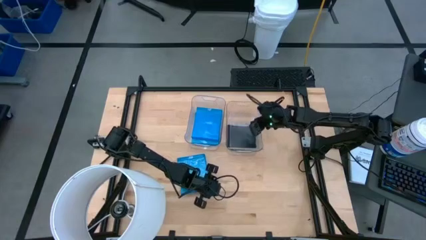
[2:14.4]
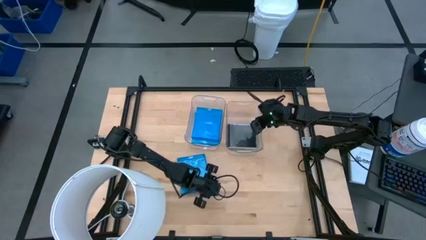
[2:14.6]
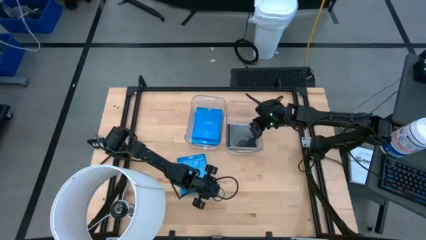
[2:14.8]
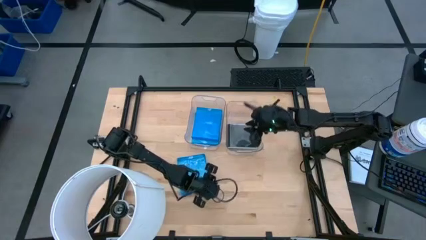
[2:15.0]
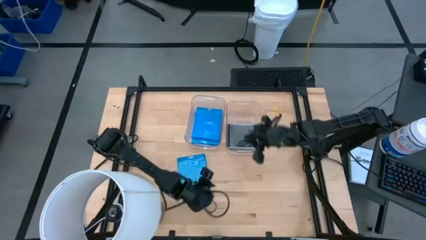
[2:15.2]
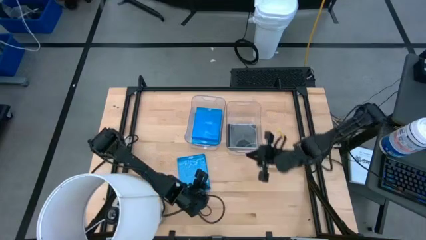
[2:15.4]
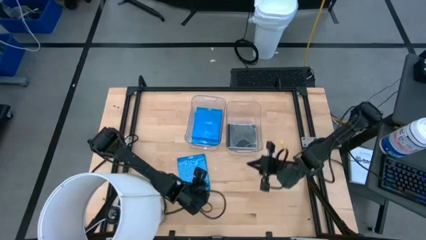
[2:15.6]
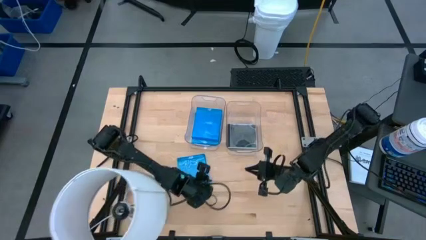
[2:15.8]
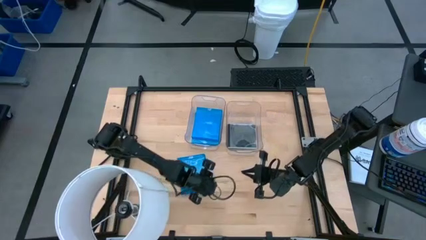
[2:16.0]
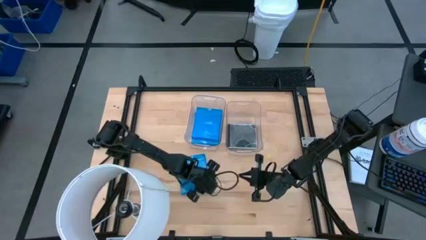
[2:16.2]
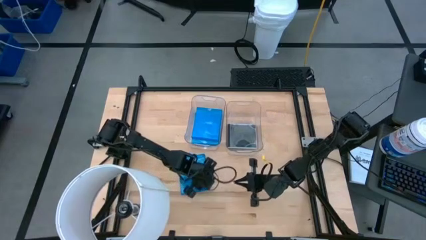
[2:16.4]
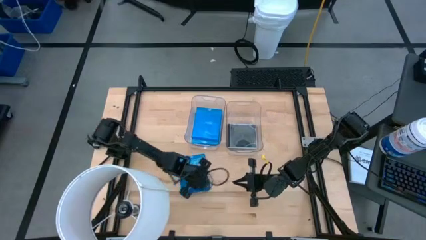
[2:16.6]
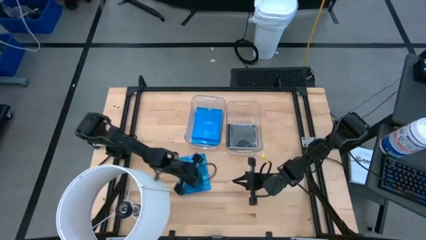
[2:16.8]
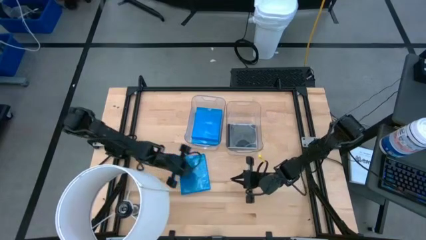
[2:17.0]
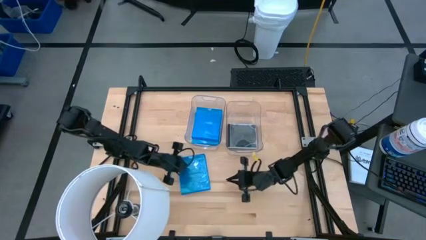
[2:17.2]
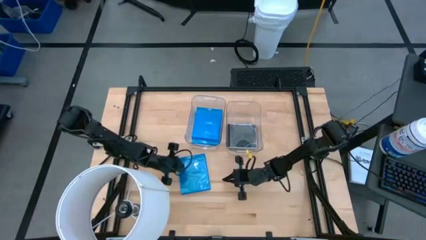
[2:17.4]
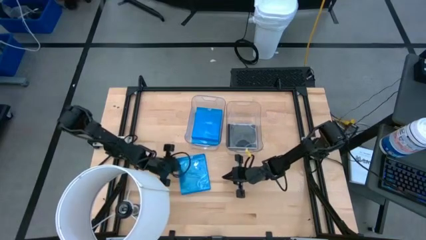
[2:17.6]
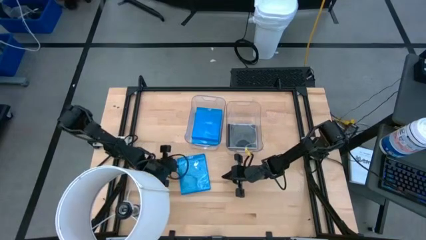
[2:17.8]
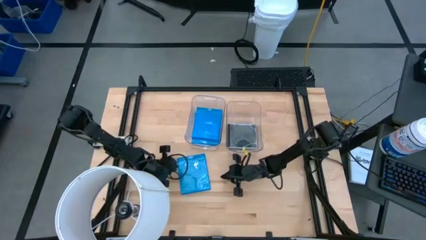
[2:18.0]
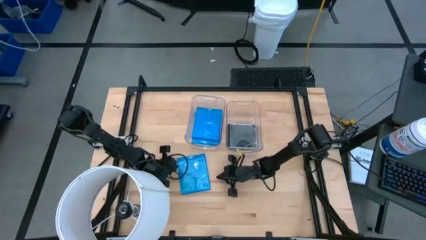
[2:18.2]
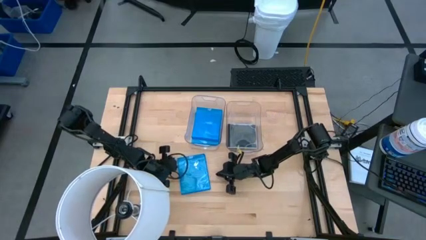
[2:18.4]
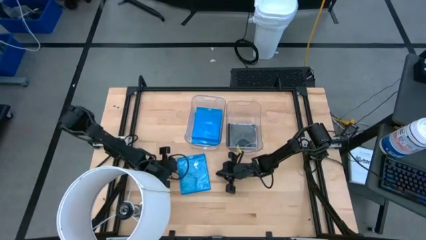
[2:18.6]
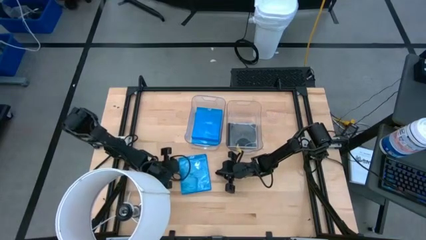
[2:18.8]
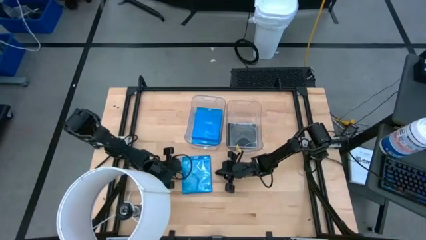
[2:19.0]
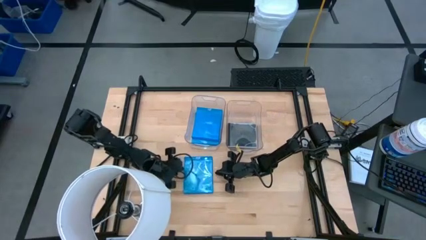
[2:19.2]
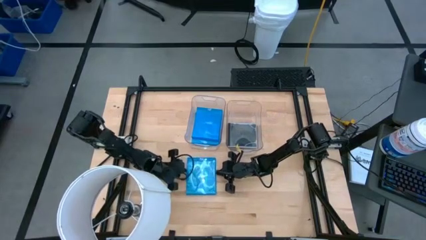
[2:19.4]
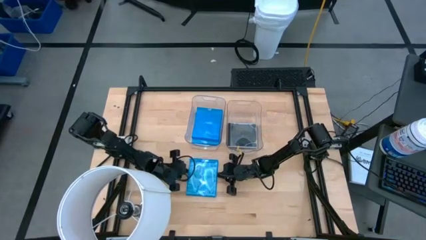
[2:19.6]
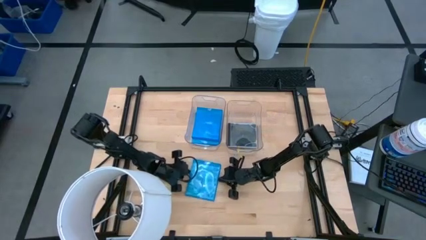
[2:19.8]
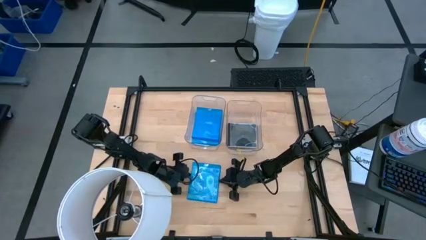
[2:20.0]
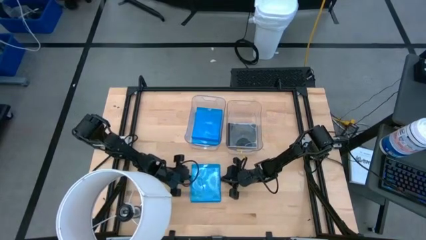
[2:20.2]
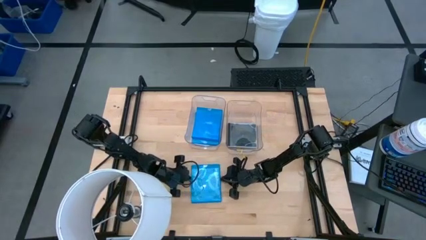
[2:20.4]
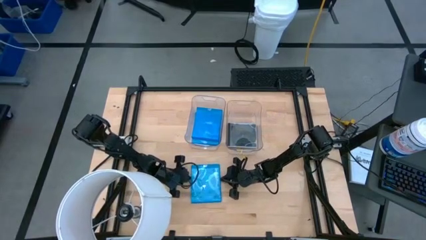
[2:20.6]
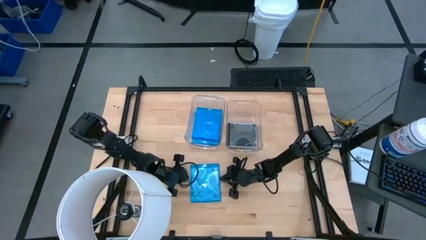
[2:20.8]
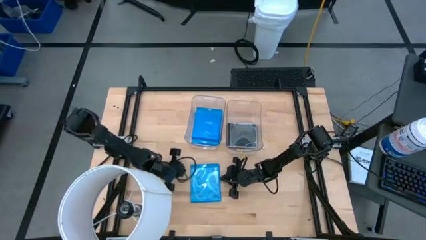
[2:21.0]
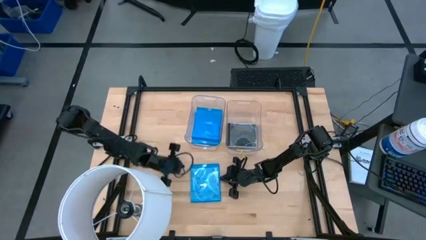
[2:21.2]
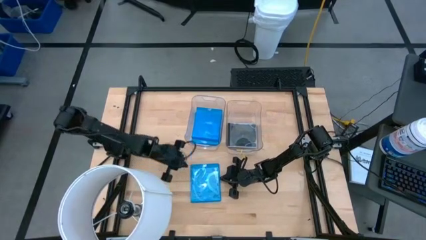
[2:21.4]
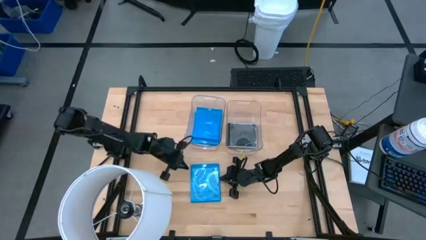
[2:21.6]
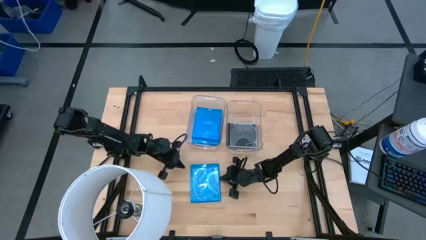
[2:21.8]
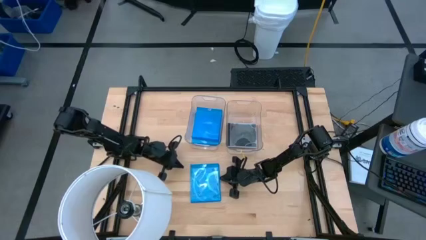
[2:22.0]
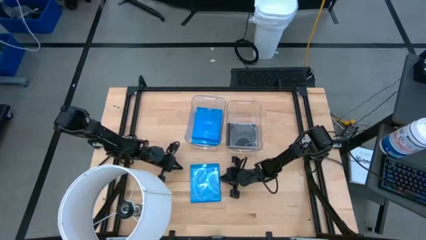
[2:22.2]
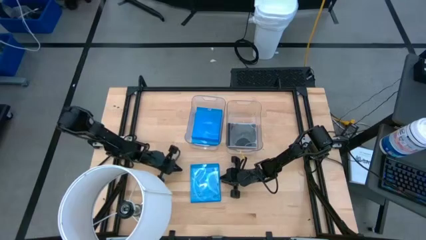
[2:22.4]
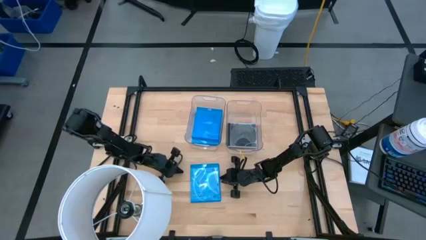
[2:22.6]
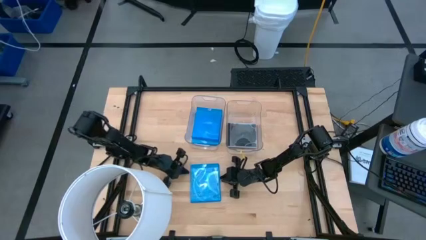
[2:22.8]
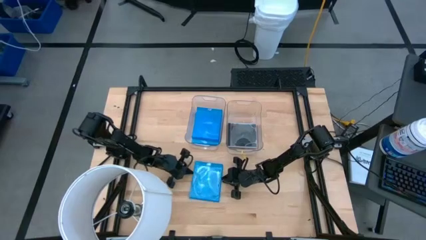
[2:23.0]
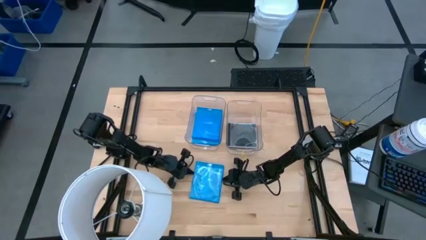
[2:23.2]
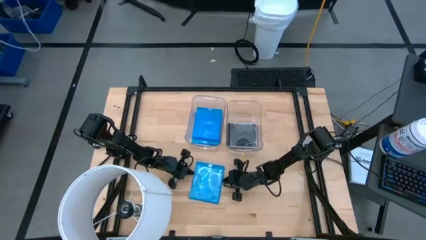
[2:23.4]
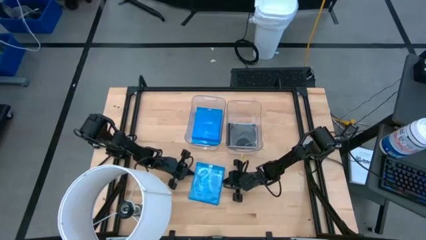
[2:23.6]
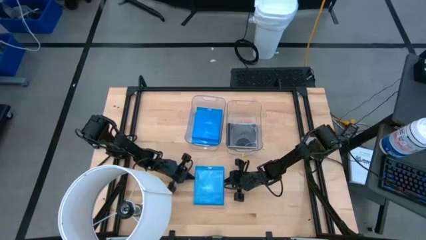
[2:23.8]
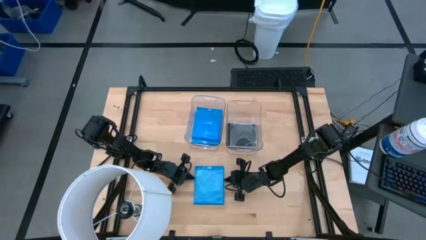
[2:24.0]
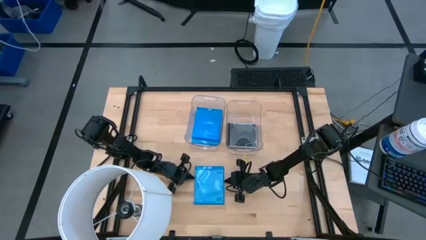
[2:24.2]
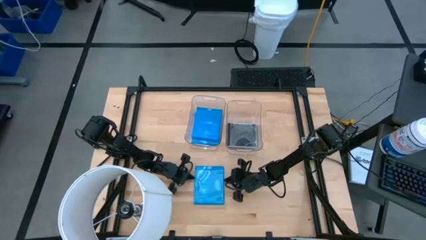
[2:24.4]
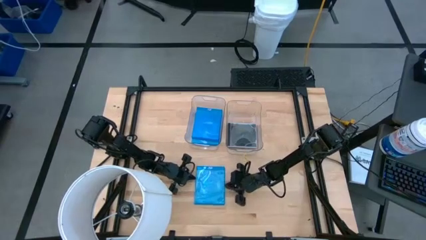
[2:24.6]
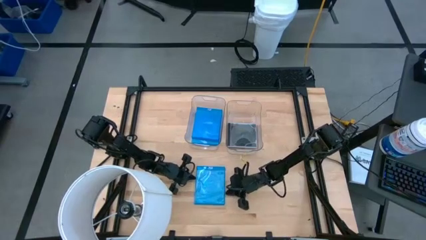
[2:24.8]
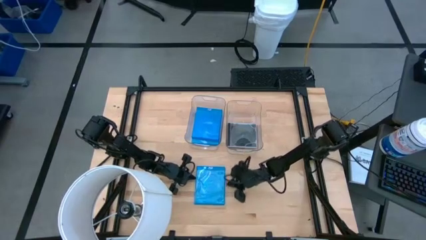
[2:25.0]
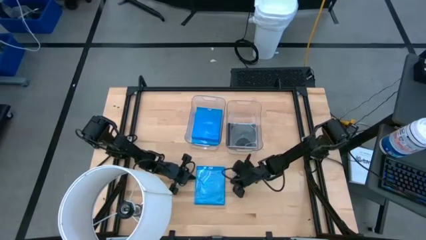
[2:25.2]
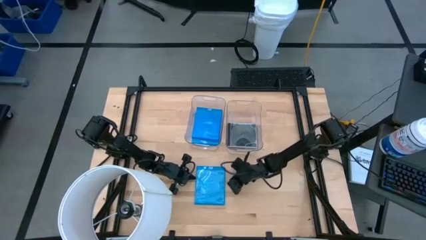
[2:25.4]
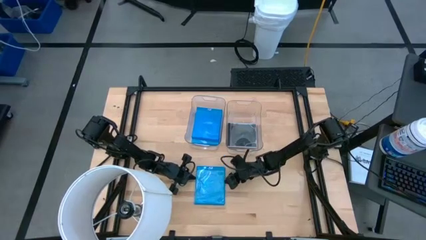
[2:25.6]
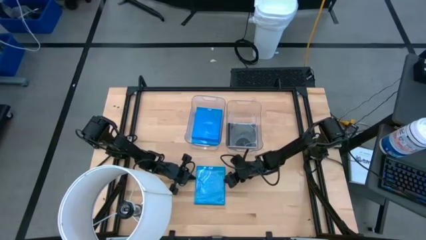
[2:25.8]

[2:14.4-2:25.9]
Task: Pick & place jewel cases by type
Put the blue CD case into the left transparent bin

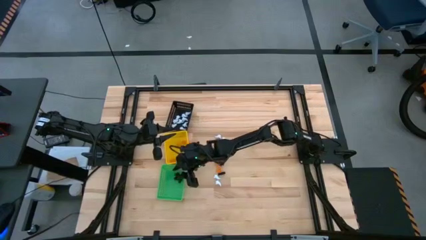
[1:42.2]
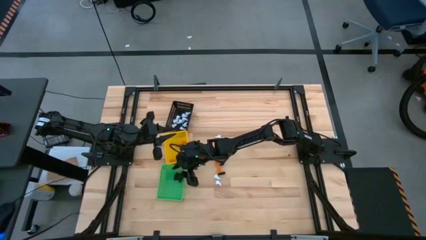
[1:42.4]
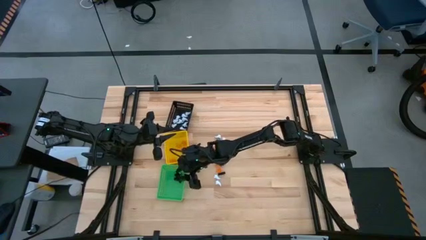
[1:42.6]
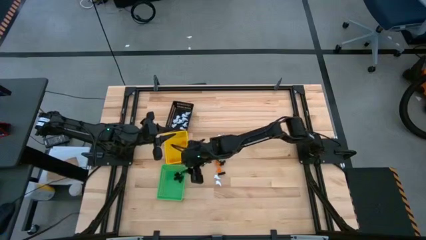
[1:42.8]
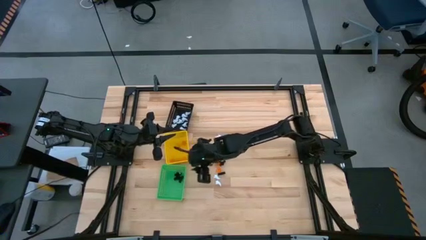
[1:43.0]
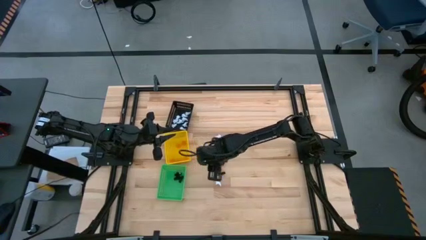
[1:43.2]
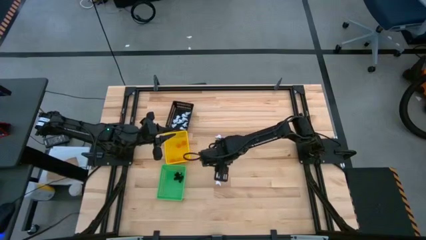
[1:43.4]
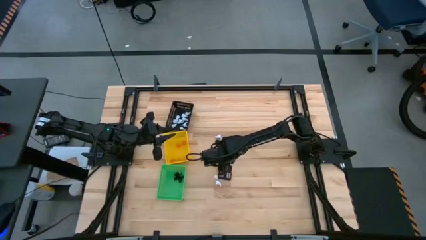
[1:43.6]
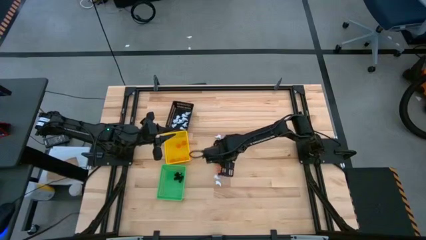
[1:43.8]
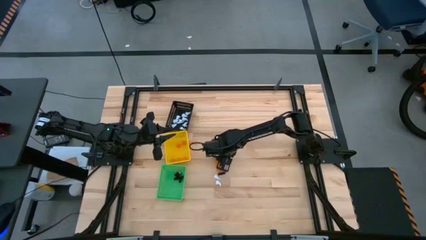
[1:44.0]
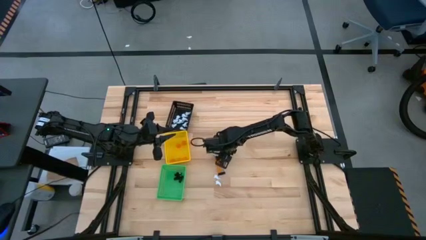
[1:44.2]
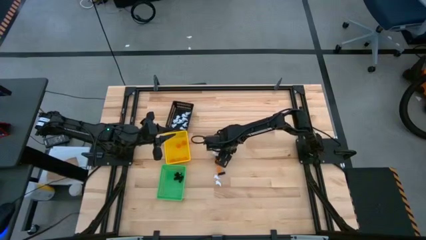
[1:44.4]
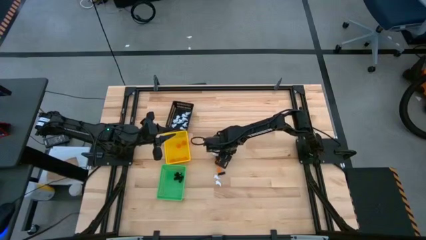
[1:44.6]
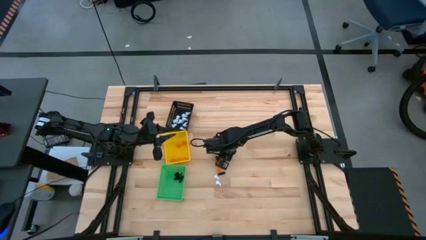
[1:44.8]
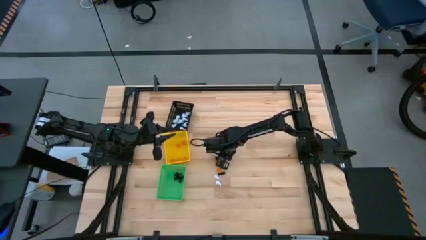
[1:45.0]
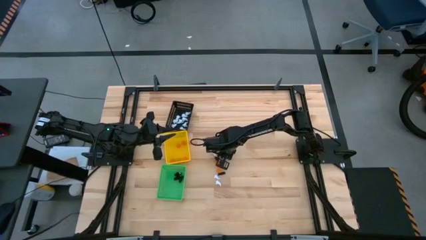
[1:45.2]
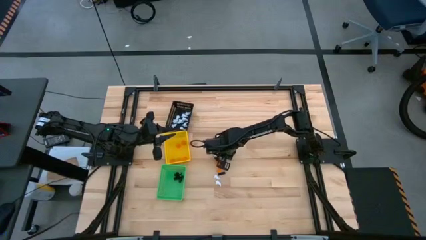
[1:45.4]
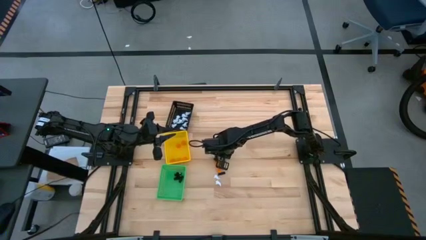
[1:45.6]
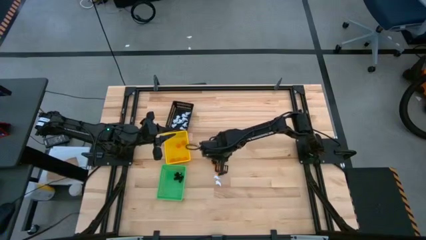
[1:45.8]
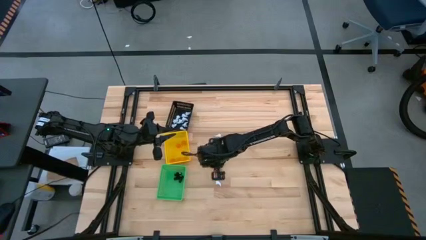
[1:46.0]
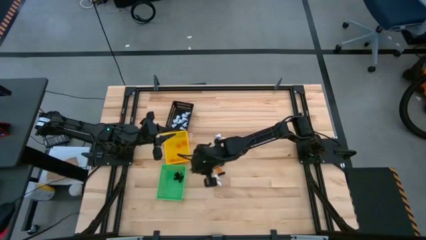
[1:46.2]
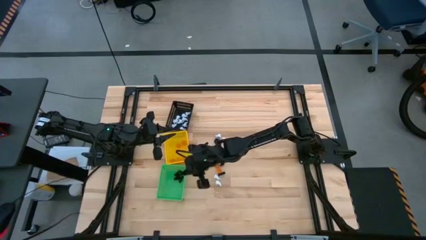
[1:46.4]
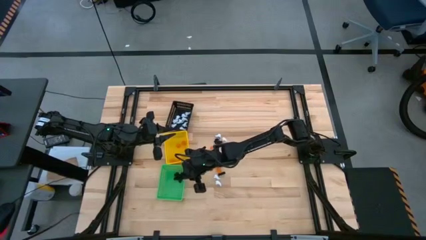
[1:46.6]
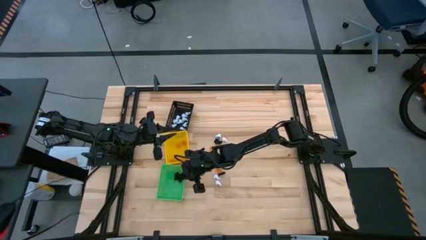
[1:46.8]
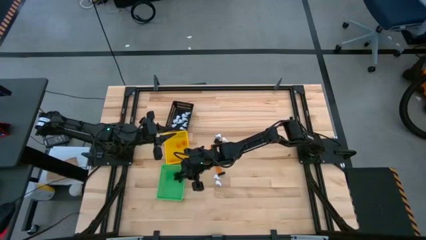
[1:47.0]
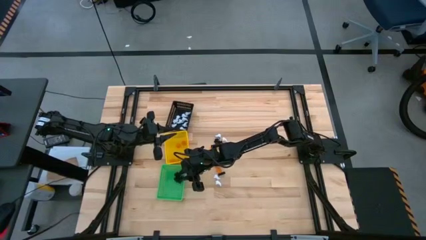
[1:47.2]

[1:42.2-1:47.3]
Task: Sort Halloween decoration
Put the black skeleton toy into the green basket
